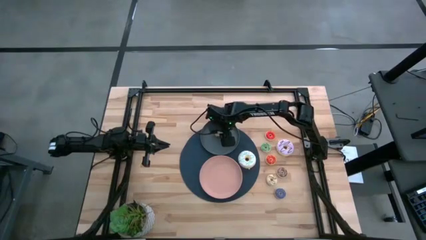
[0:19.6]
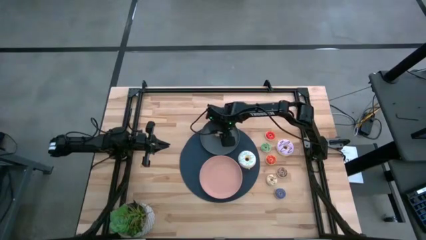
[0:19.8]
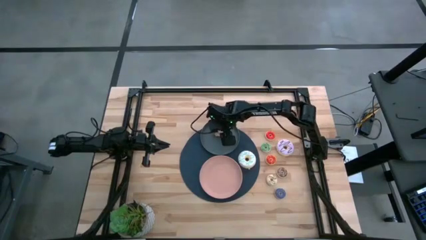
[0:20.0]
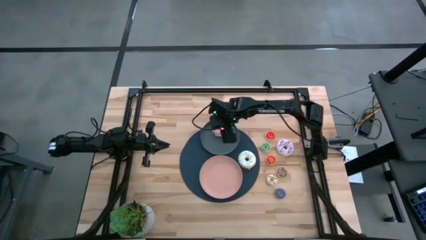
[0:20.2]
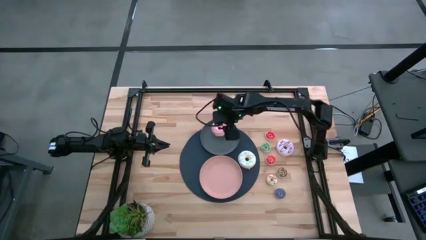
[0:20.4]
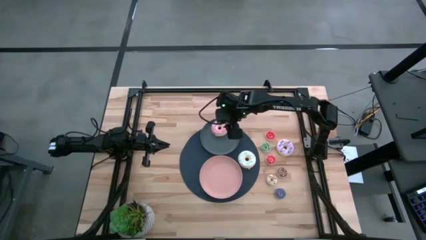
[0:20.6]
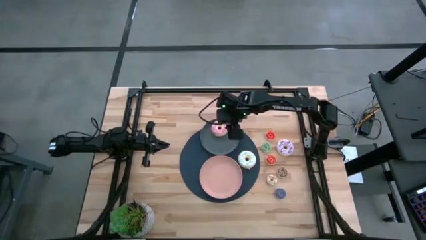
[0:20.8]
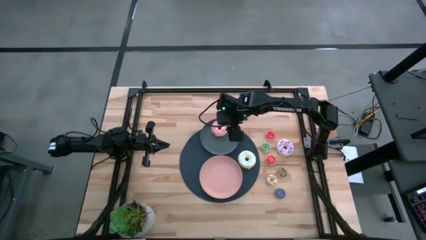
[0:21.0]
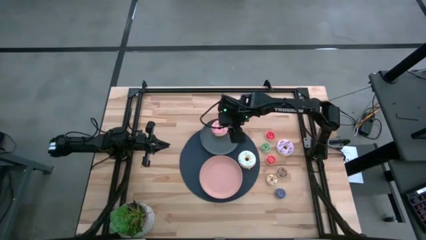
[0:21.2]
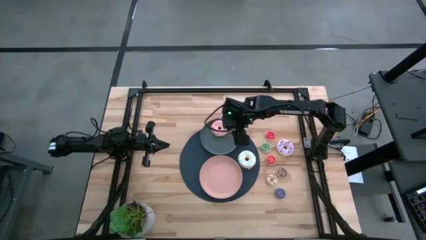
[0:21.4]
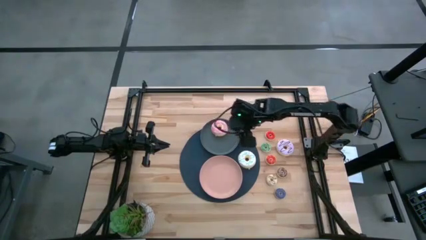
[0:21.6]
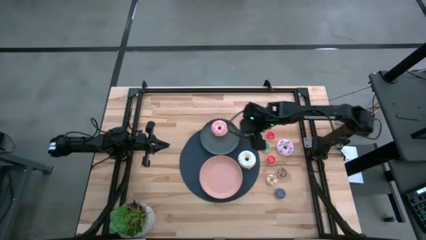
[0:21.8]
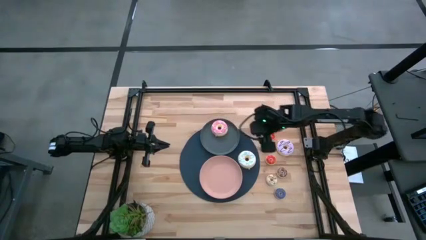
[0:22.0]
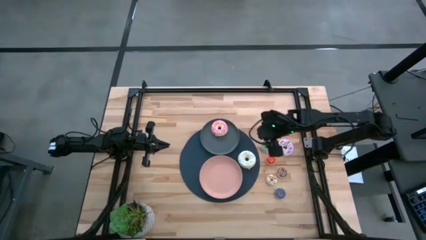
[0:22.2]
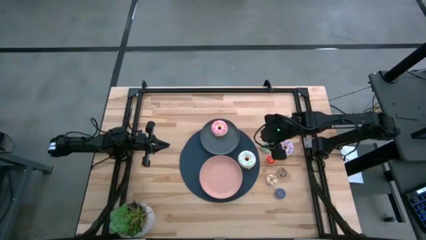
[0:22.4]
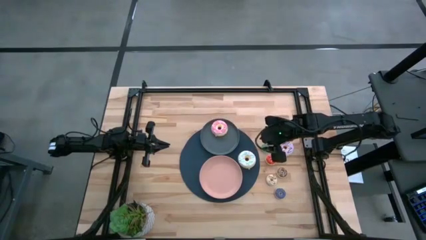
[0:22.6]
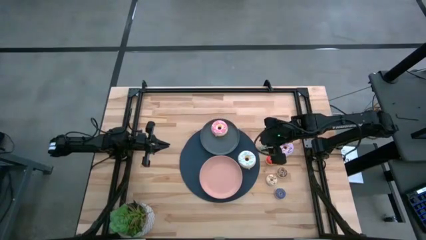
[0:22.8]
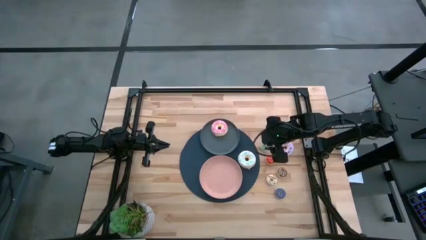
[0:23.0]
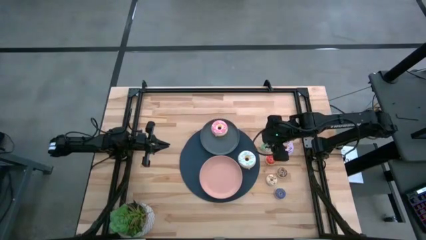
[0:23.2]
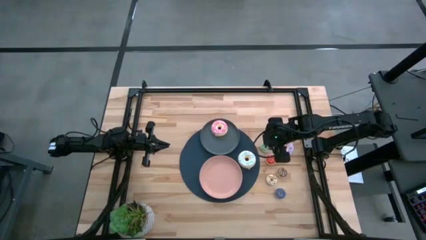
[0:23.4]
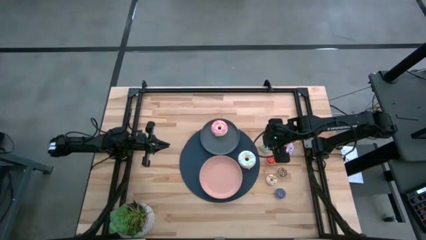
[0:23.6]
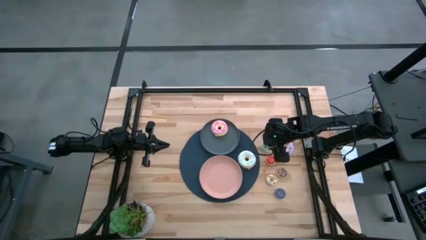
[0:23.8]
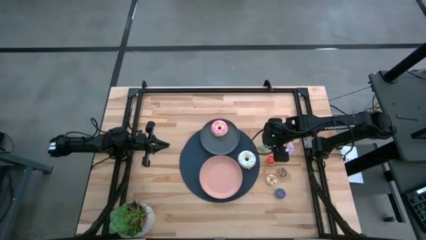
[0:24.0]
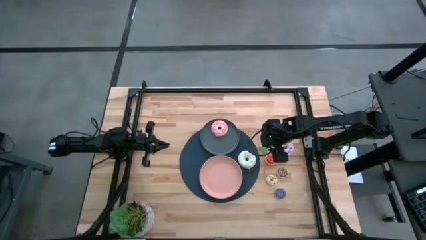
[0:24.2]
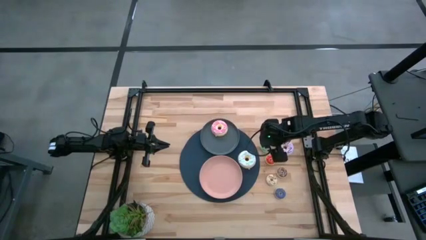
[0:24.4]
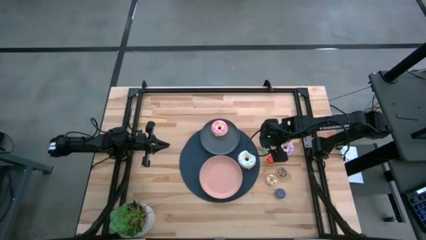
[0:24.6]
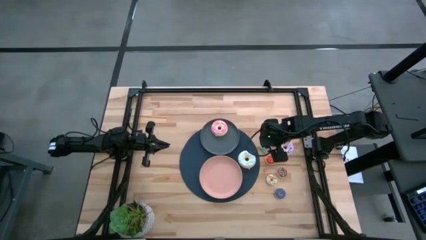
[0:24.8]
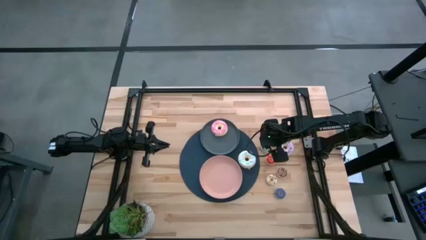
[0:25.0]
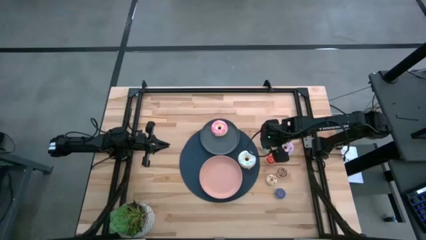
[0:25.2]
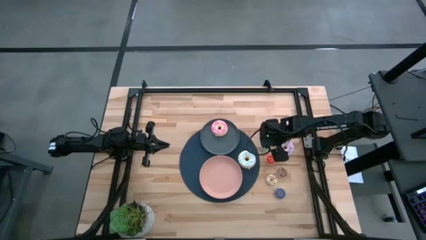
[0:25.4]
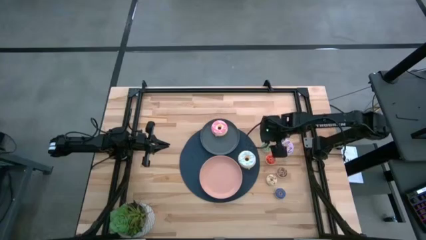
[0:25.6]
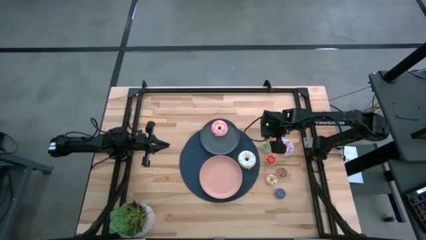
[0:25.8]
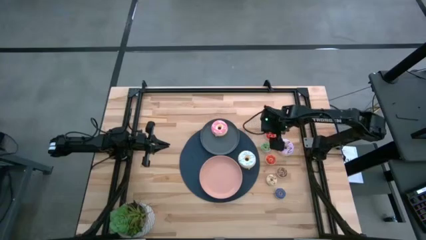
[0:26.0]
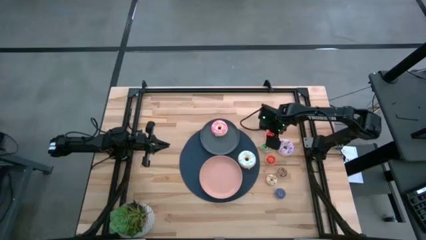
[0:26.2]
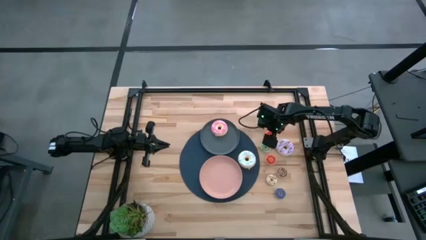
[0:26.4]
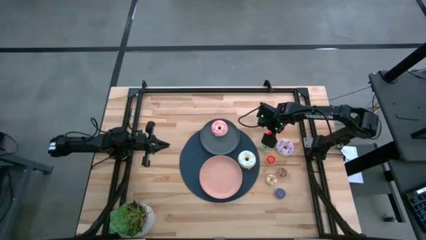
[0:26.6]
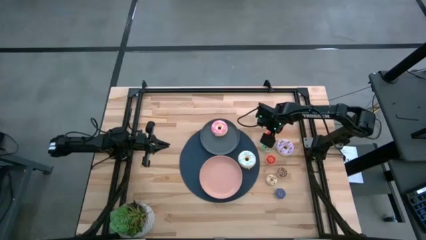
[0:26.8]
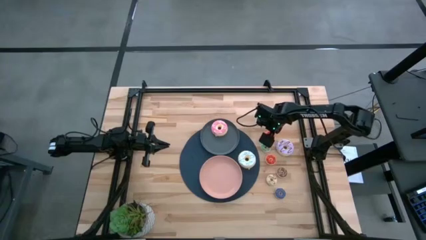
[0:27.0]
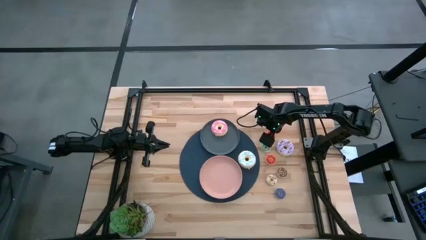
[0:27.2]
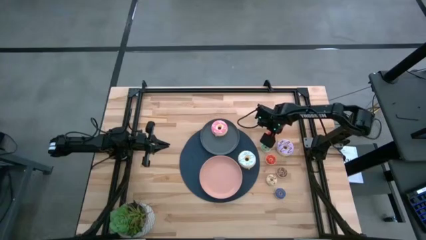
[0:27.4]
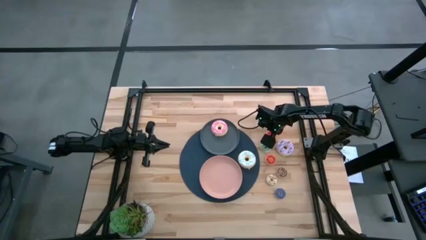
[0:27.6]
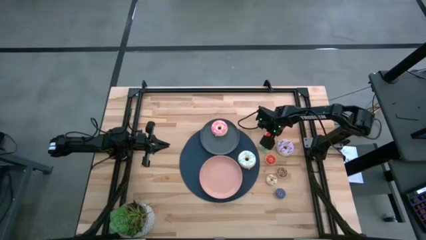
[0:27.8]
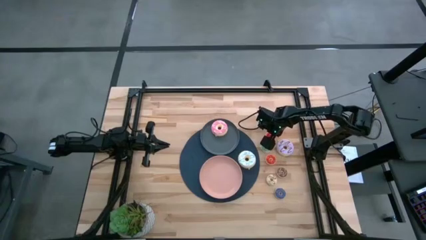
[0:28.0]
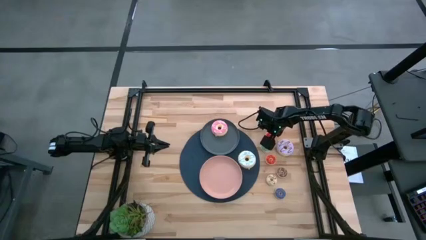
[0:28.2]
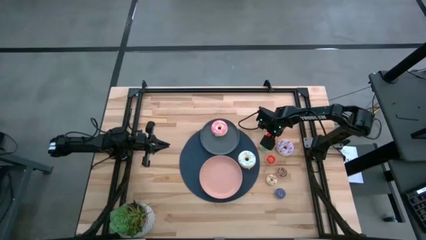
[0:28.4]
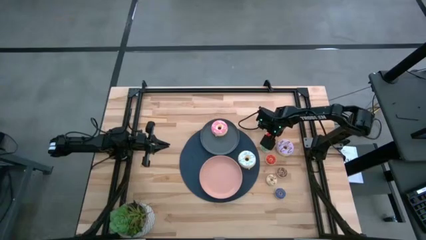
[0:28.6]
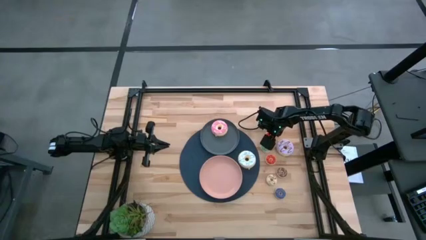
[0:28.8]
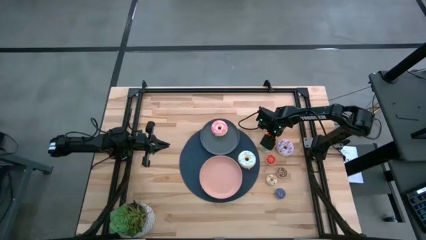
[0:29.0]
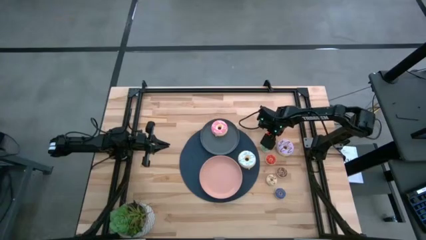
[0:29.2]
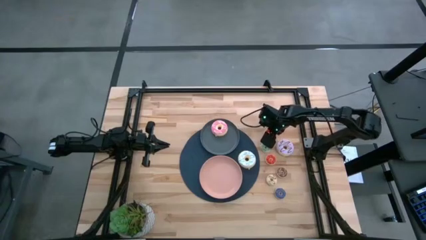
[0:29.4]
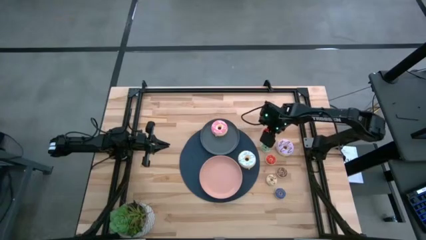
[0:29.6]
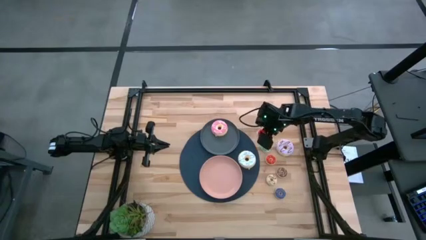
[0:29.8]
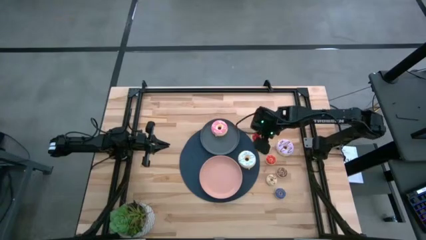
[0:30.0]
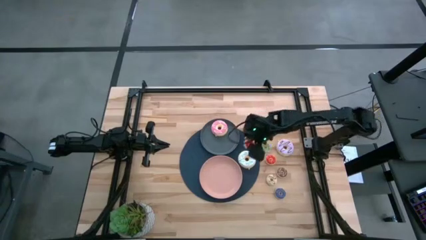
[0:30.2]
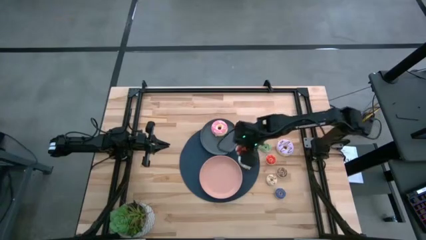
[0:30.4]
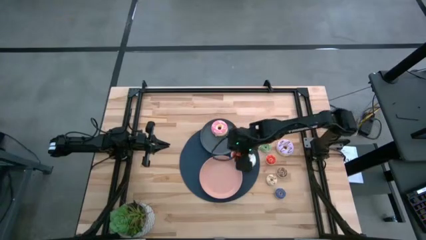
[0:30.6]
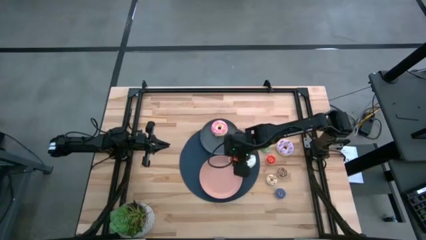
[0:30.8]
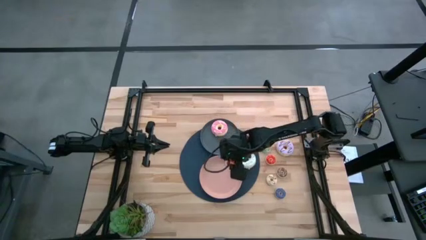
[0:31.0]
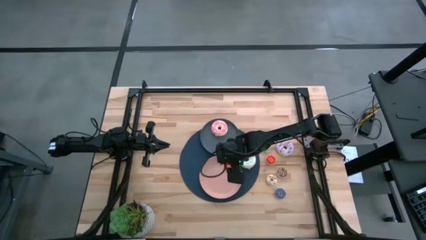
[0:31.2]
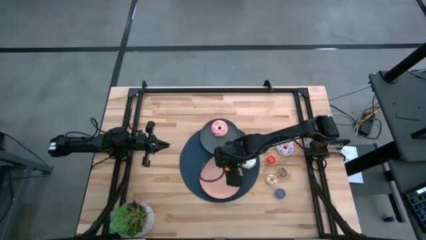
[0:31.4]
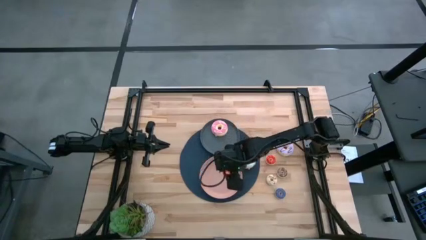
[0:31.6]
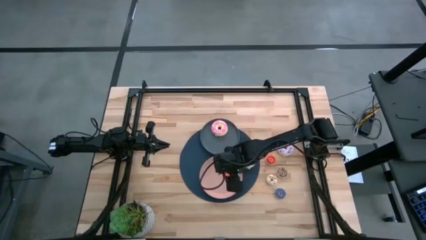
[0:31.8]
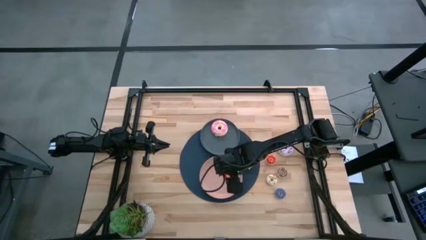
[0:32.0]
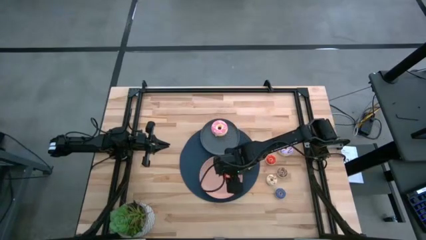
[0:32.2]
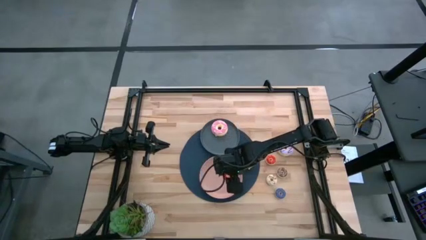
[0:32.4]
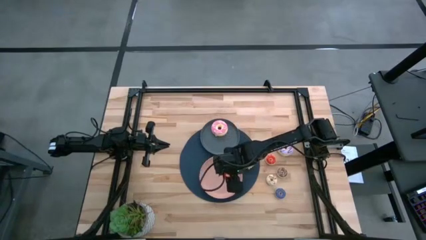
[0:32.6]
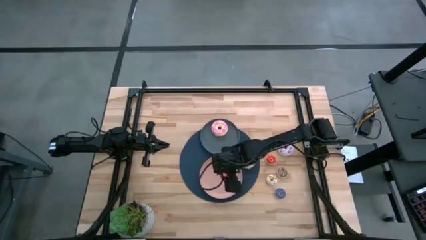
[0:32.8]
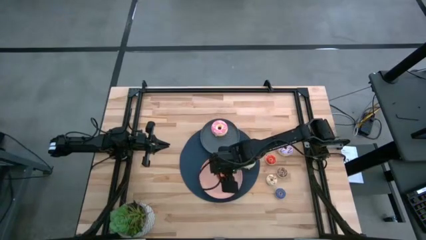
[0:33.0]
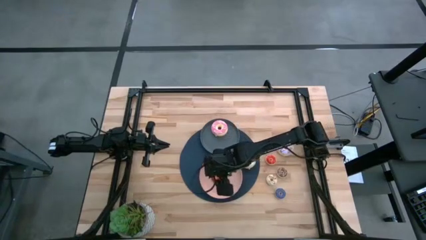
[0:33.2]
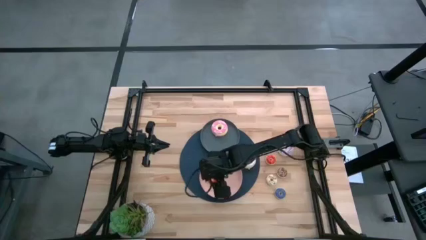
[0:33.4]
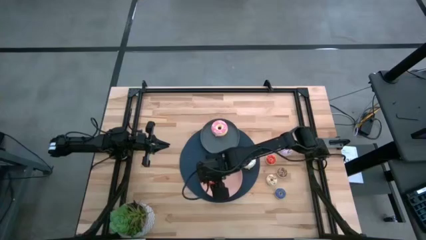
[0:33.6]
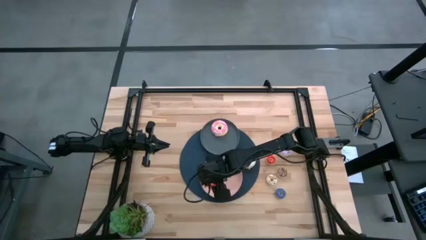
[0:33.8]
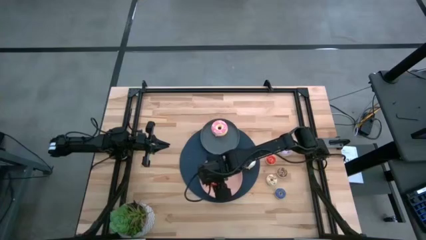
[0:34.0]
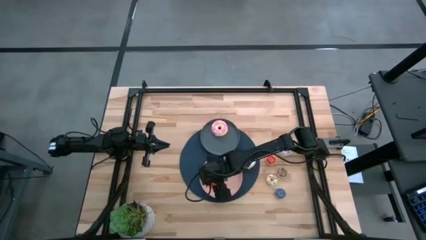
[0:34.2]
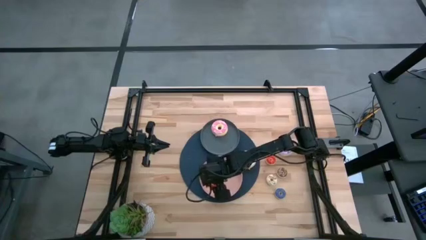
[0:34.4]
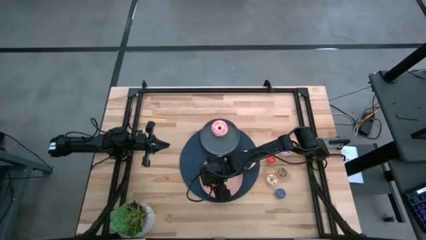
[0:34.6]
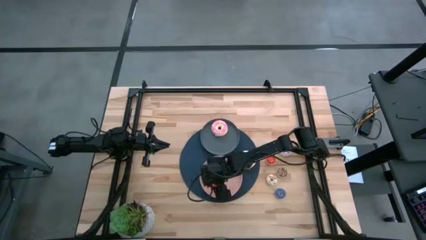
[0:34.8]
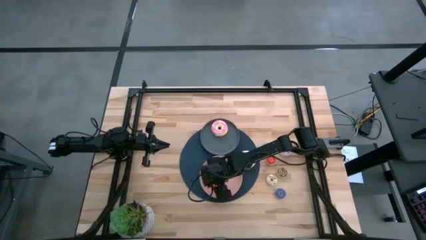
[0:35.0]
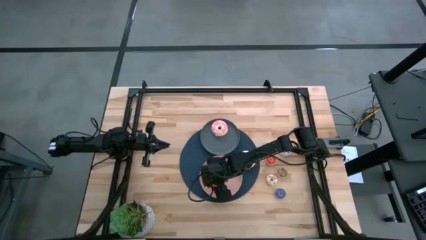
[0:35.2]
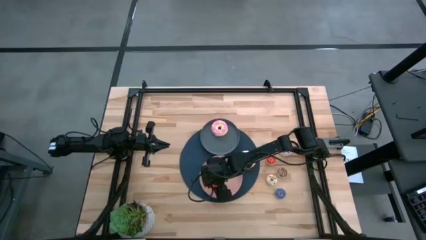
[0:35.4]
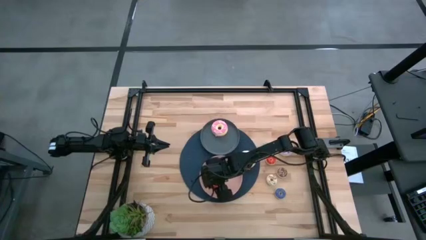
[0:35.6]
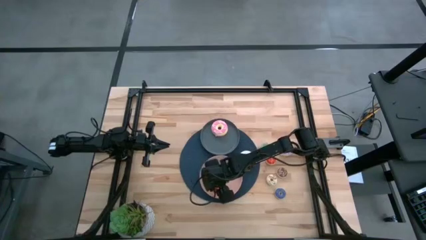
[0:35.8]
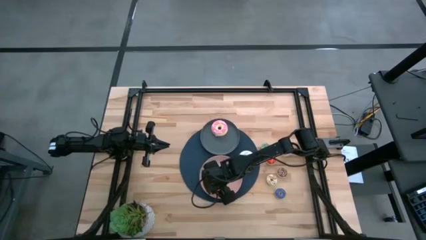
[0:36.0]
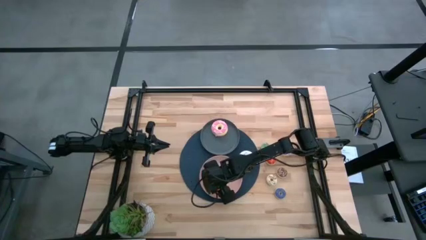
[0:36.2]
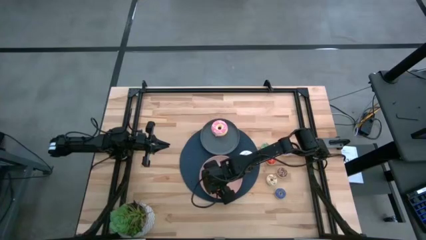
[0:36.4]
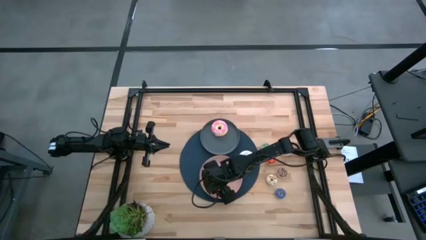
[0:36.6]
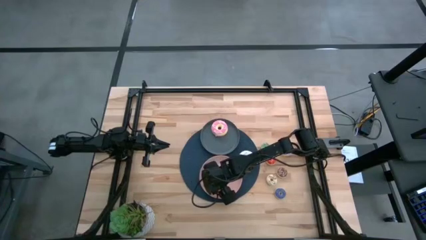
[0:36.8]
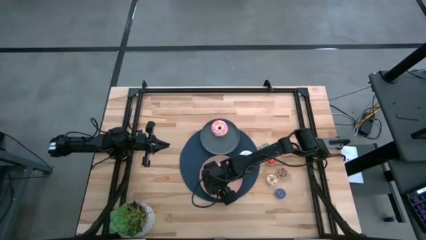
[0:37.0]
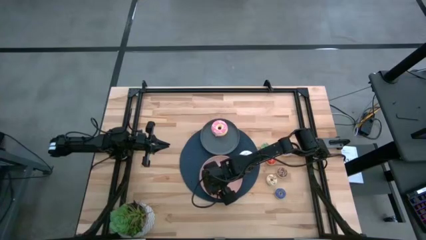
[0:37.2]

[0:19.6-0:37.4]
Task: Pick & Place donuts
Put the top small orange doughnut into the pink plate
